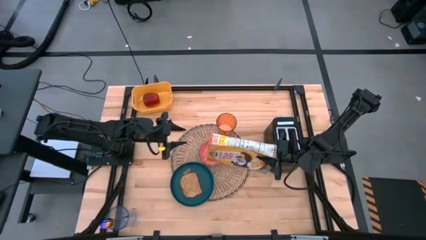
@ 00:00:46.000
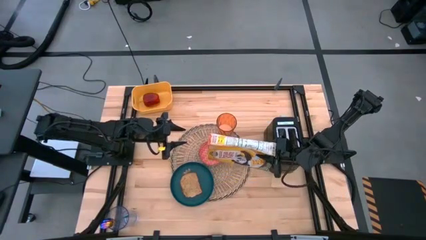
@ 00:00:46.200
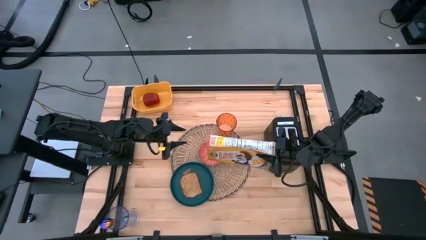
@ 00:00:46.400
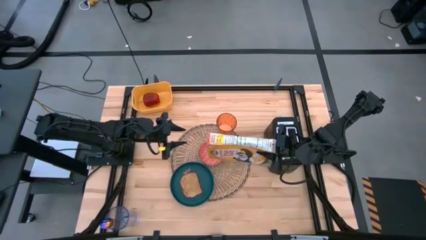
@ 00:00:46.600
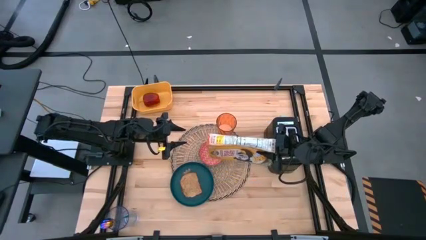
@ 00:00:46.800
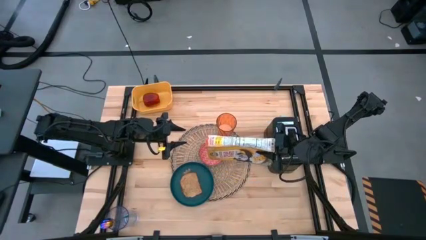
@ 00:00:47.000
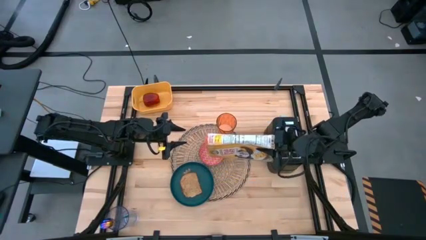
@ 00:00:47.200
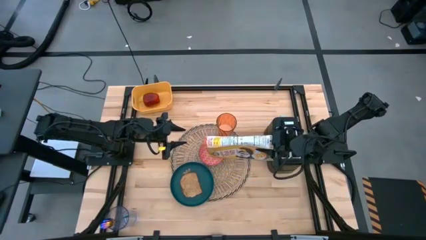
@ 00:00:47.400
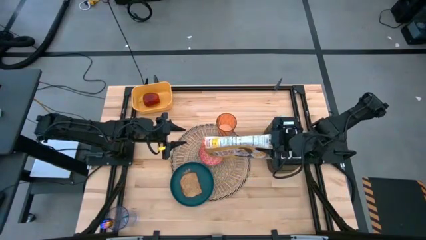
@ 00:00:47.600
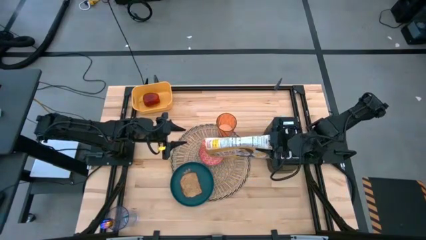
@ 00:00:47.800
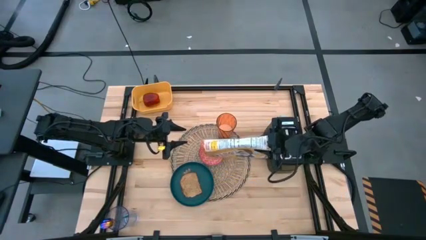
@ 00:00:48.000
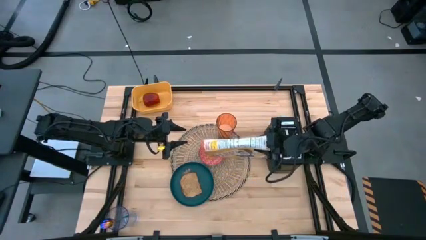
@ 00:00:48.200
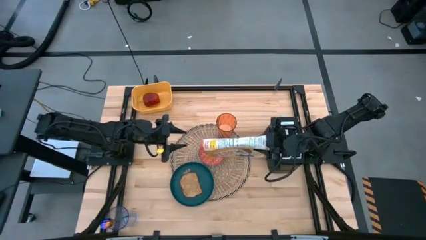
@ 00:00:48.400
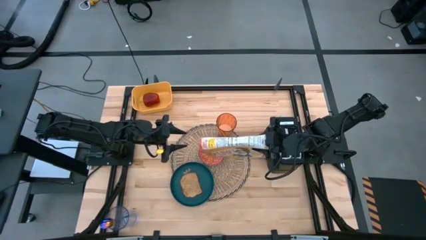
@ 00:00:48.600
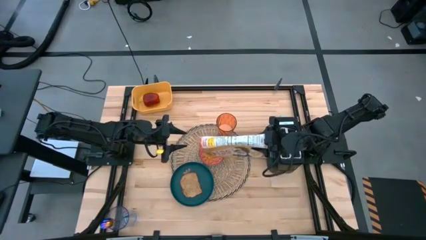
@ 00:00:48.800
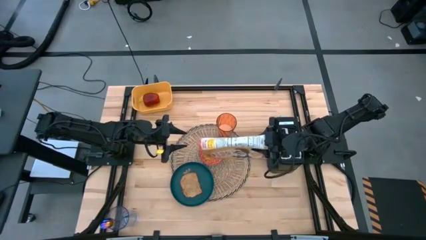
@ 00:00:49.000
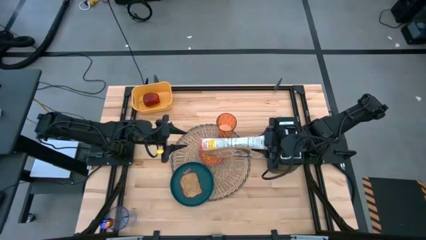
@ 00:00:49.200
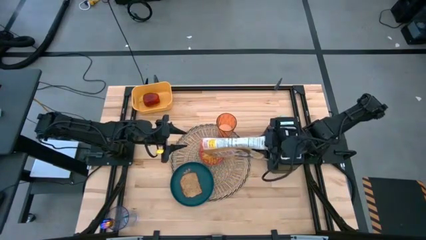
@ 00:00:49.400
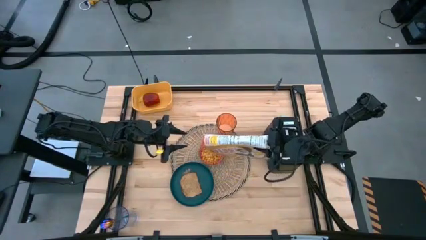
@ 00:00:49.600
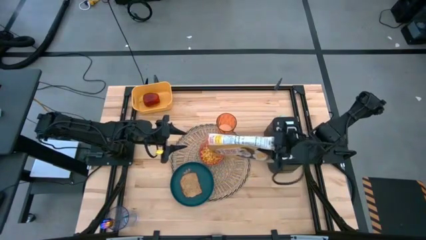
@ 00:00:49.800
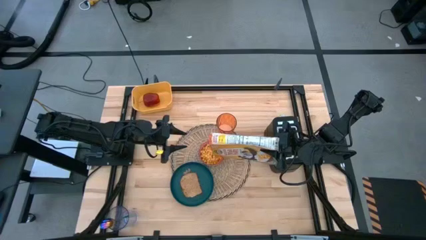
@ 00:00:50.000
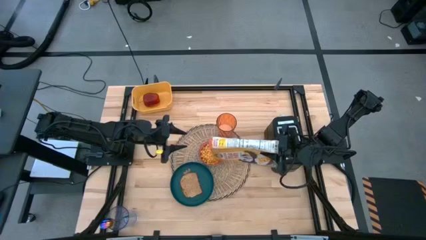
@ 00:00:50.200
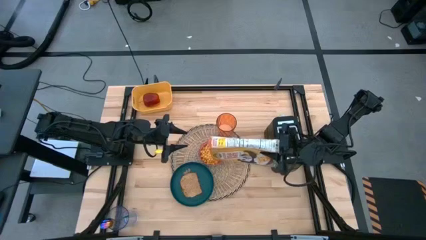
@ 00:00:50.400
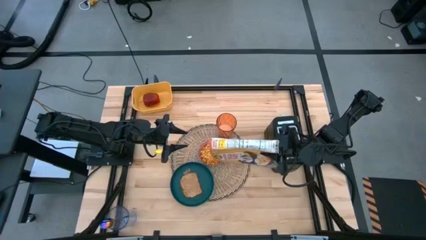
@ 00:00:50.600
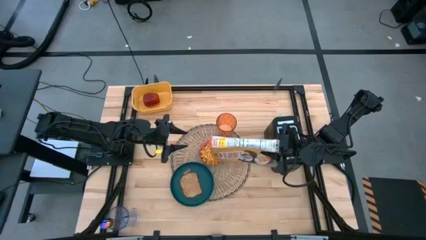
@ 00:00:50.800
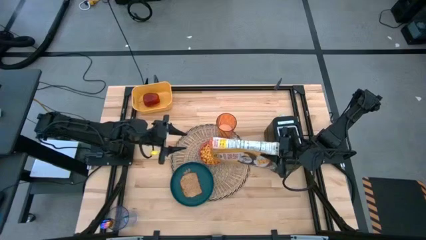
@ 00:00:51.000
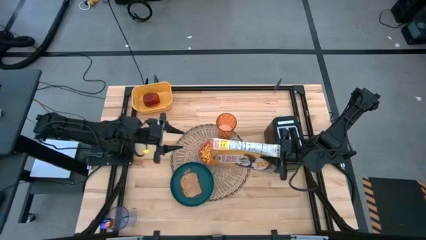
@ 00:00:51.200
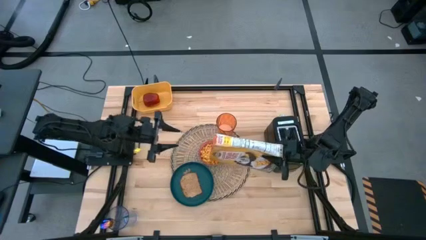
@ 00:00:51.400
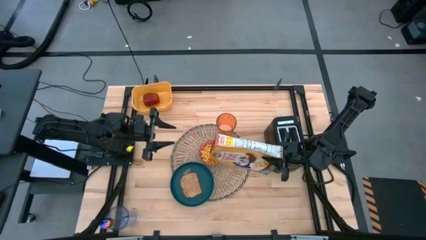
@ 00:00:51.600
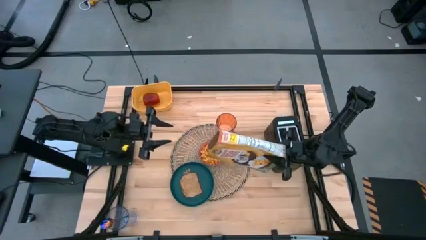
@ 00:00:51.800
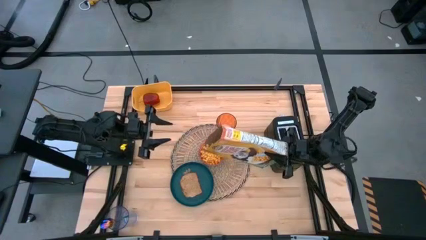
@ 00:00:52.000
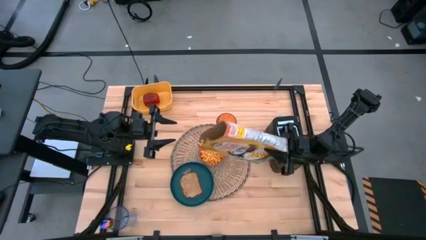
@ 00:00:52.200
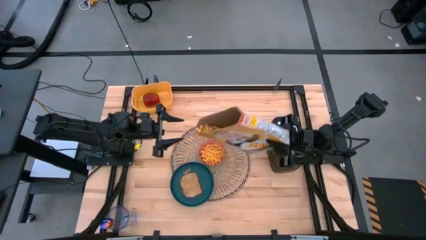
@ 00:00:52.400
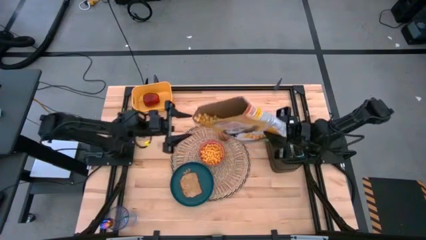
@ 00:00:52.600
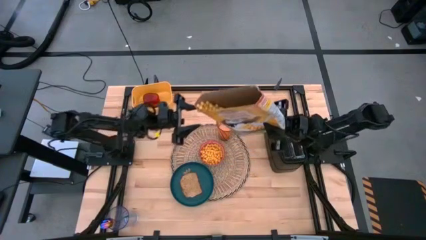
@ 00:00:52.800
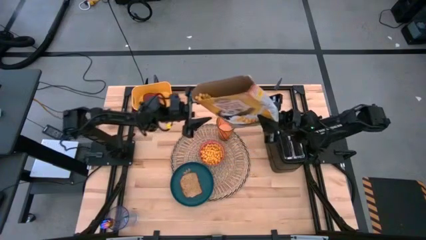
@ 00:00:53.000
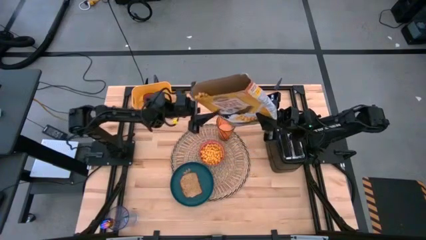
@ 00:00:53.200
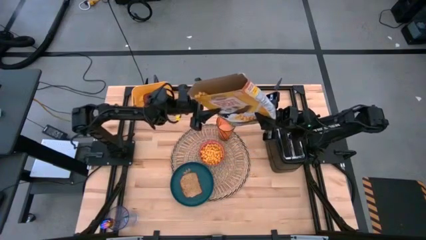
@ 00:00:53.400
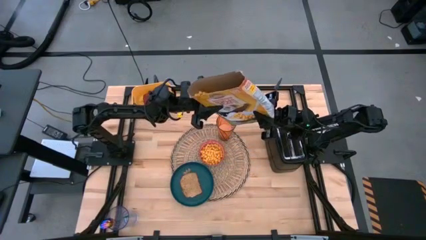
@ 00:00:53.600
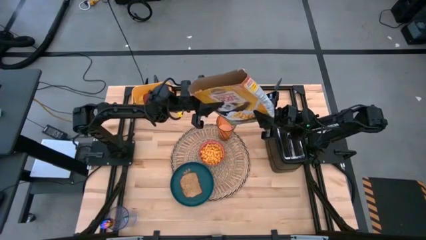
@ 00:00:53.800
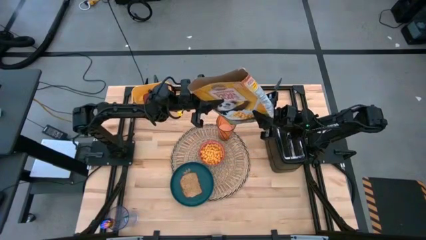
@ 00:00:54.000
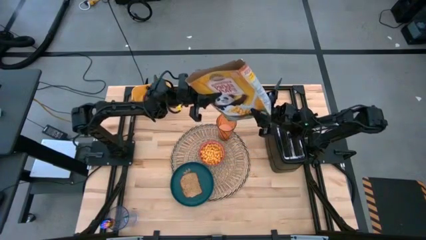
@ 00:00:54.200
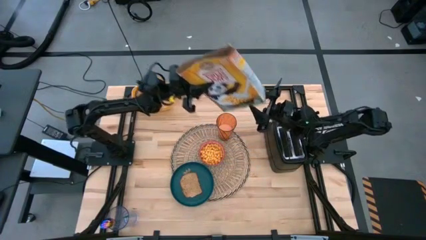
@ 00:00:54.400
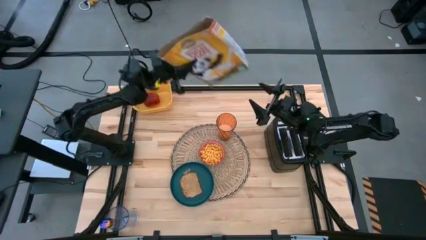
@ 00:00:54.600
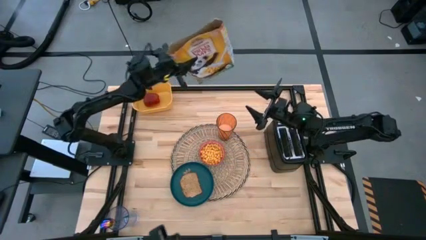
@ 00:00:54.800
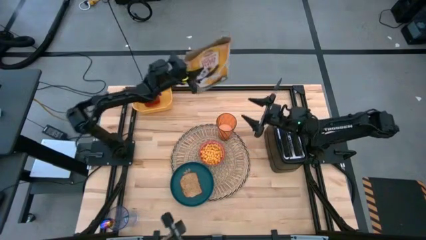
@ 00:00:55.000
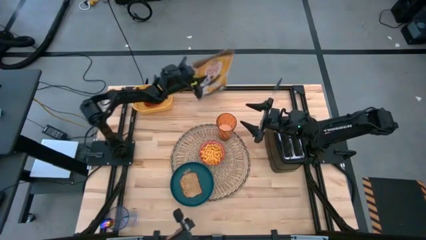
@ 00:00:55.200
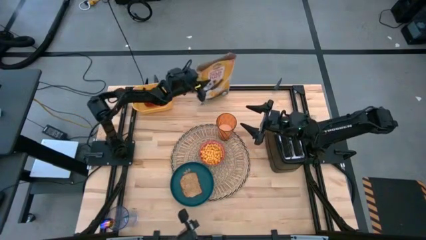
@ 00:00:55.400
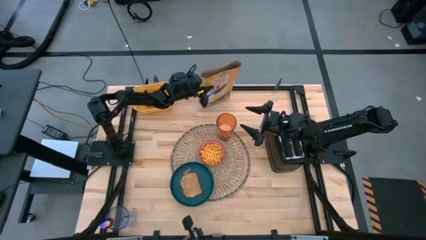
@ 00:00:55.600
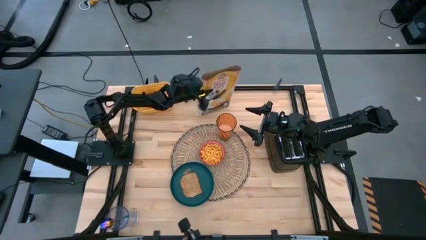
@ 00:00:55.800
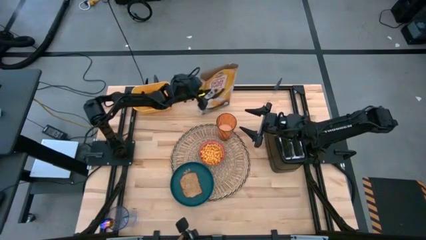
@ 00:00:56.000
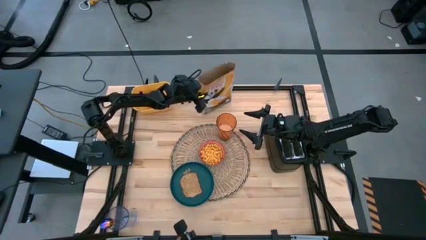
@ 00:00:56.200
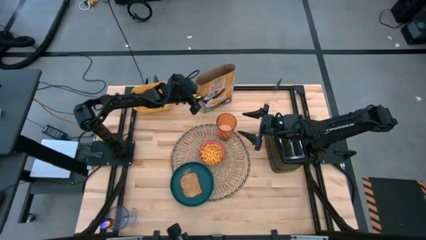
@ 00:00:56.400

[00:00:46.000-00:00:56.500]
Task: Arrange a breakfast setting
Pour the cereal from the cereal box into the red bowl
